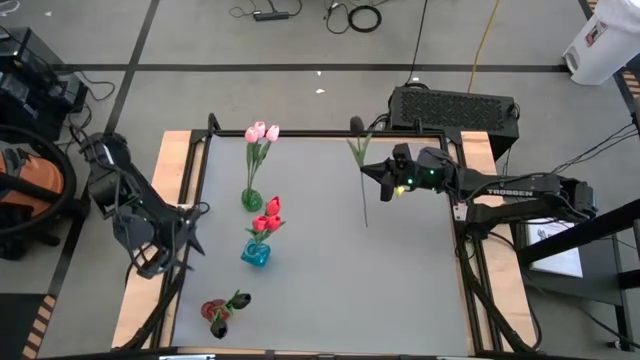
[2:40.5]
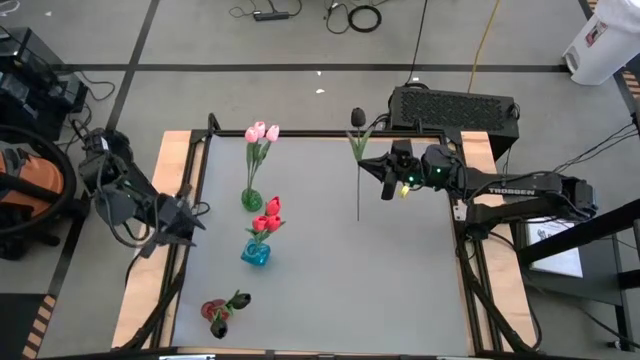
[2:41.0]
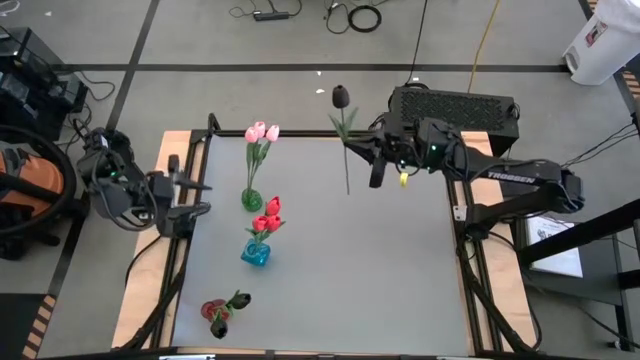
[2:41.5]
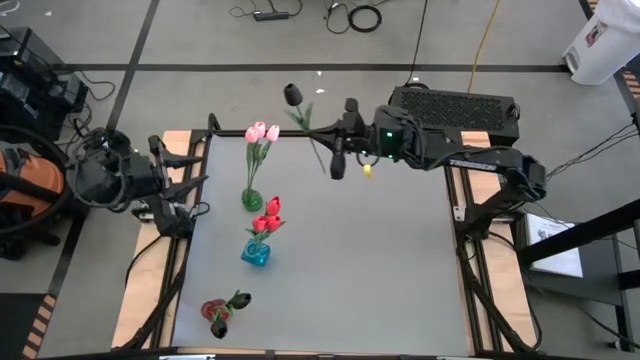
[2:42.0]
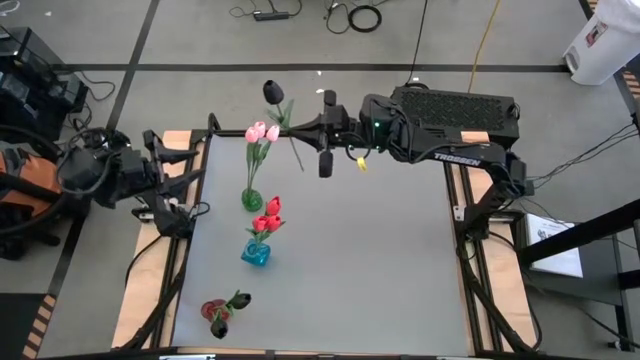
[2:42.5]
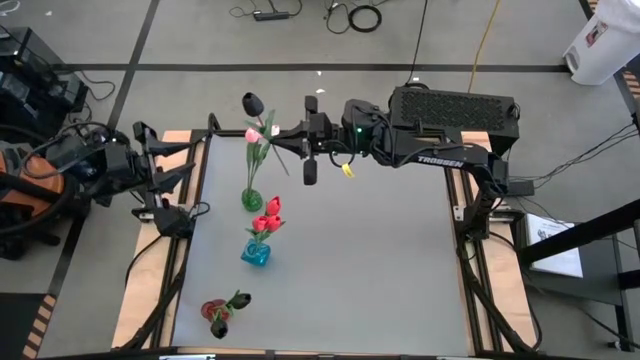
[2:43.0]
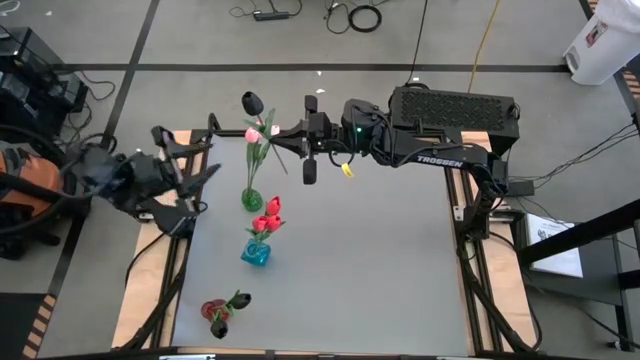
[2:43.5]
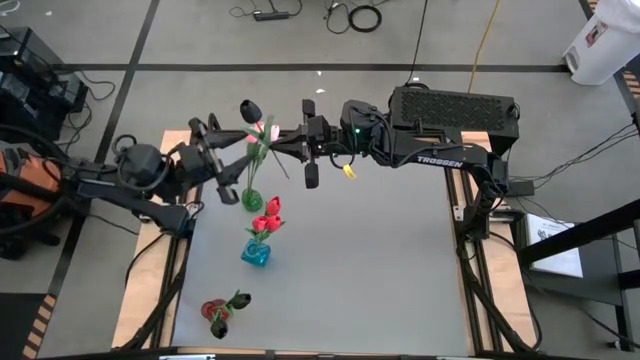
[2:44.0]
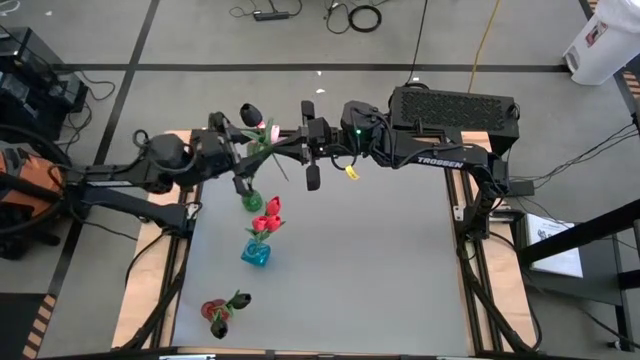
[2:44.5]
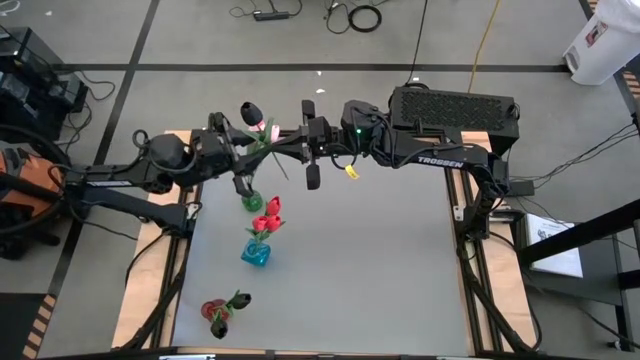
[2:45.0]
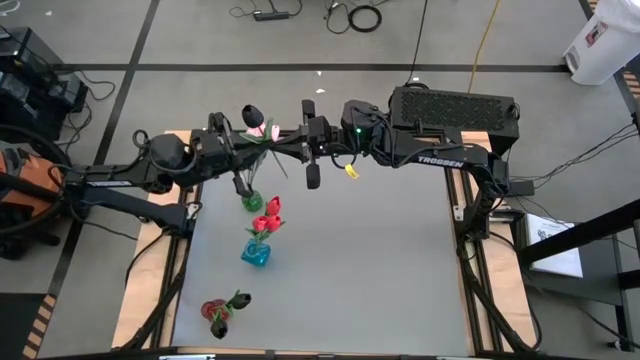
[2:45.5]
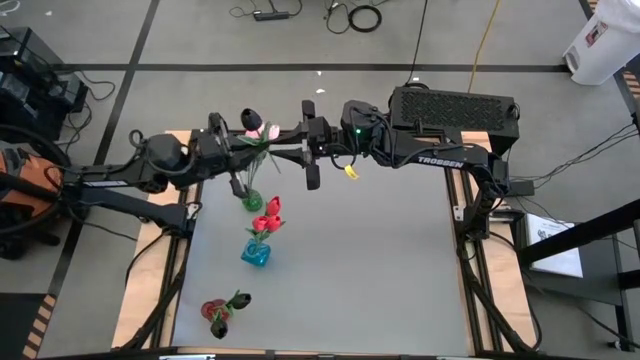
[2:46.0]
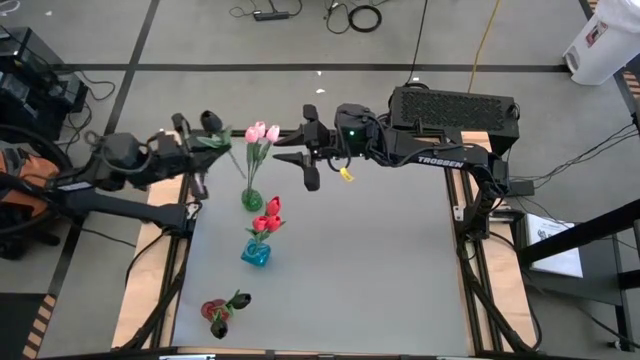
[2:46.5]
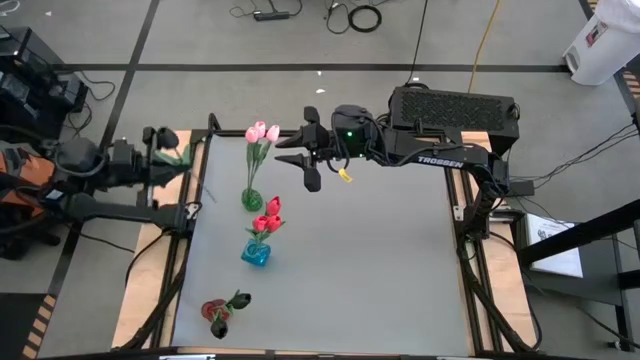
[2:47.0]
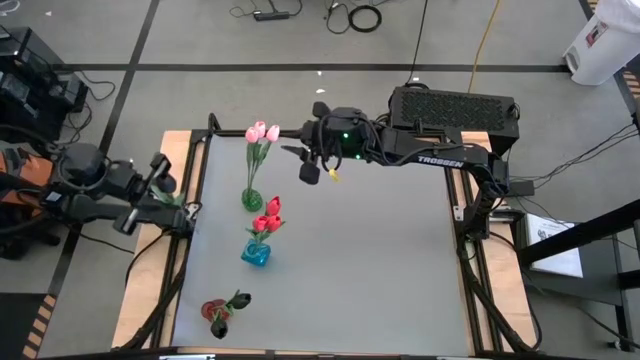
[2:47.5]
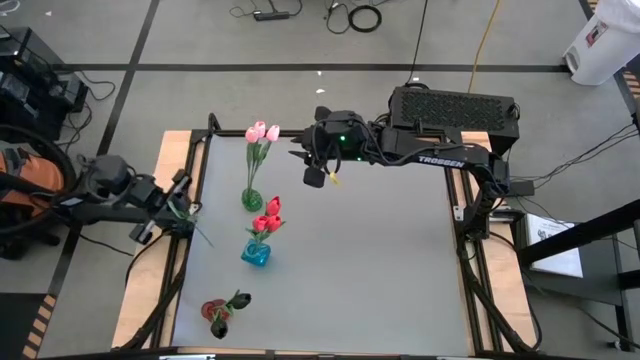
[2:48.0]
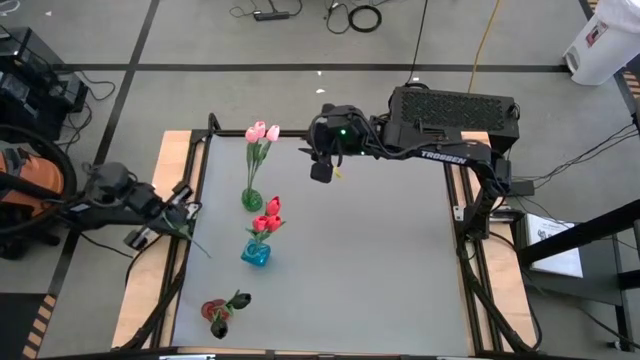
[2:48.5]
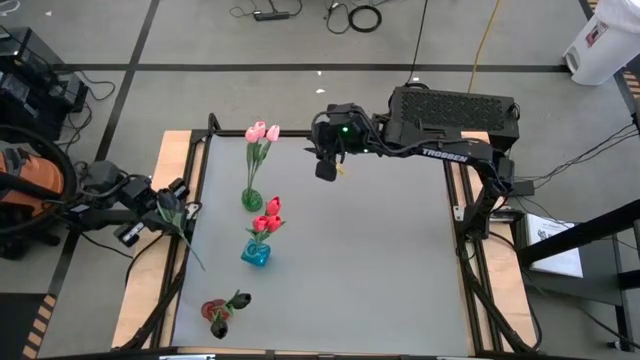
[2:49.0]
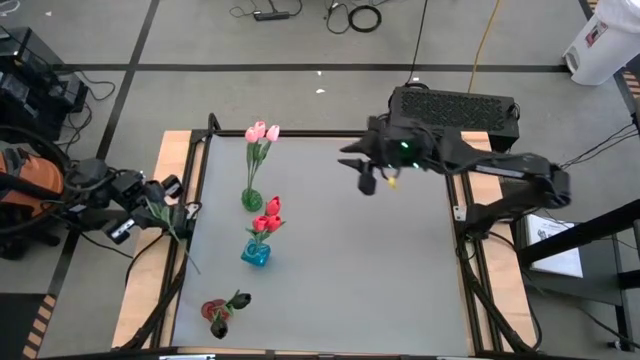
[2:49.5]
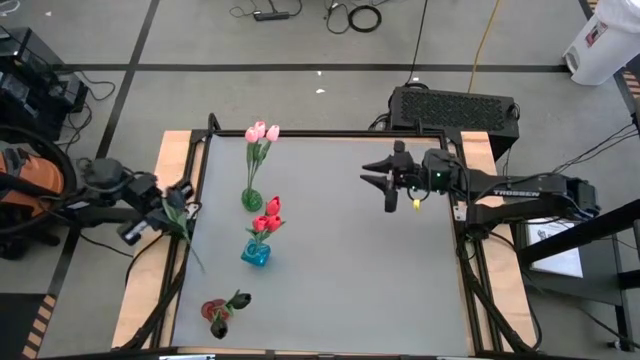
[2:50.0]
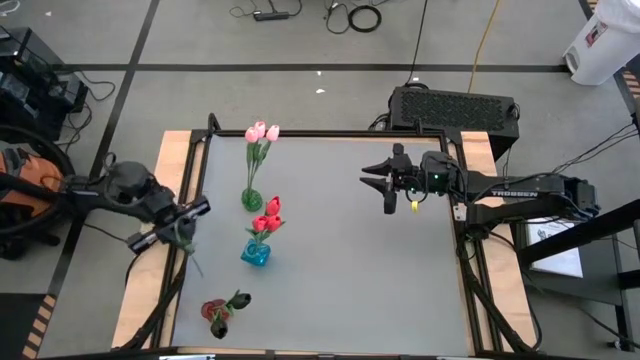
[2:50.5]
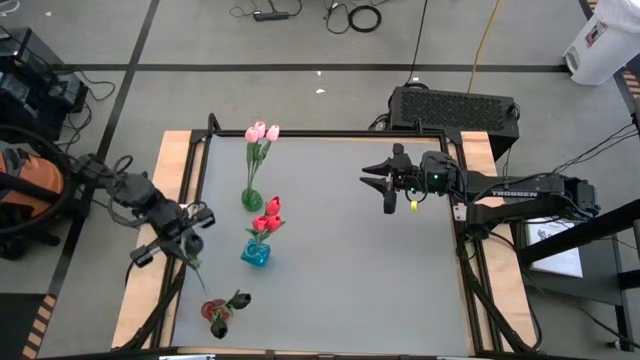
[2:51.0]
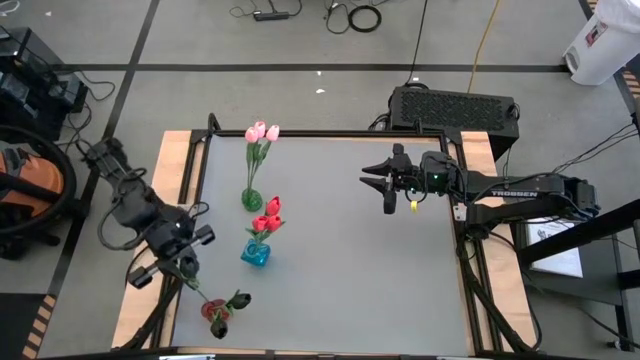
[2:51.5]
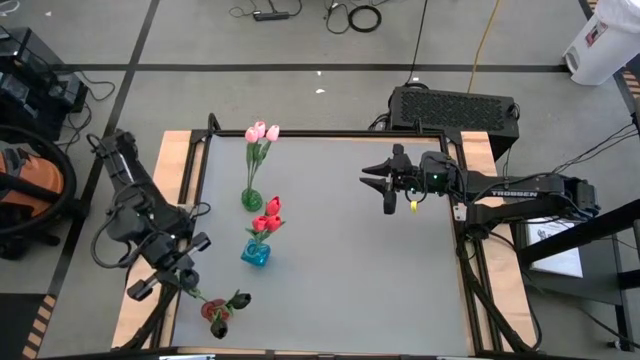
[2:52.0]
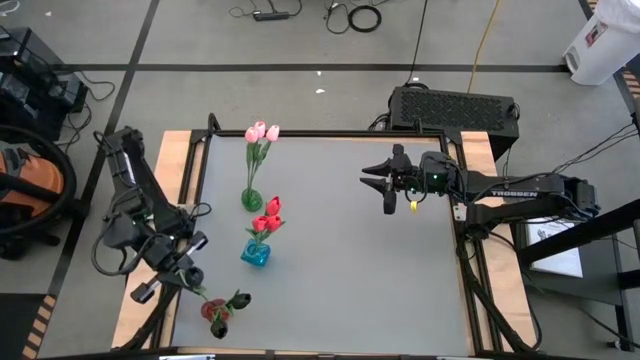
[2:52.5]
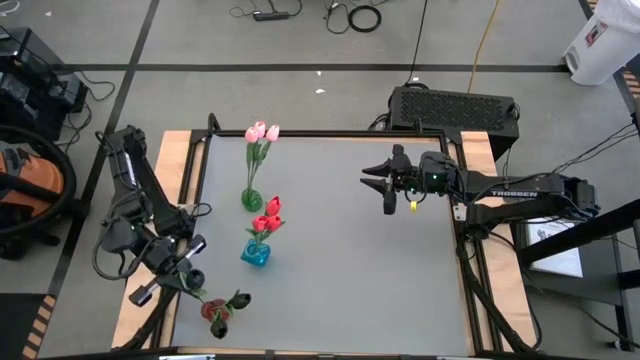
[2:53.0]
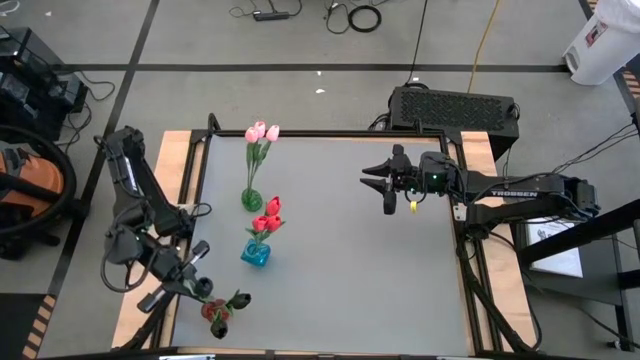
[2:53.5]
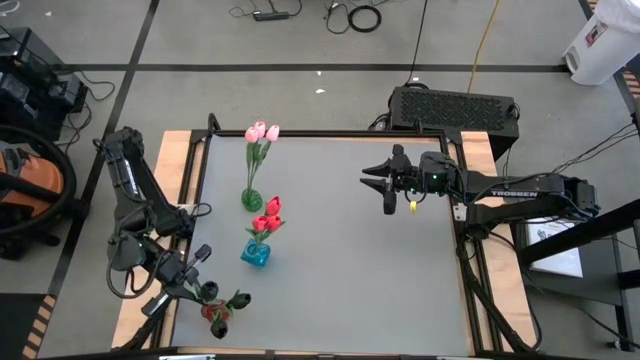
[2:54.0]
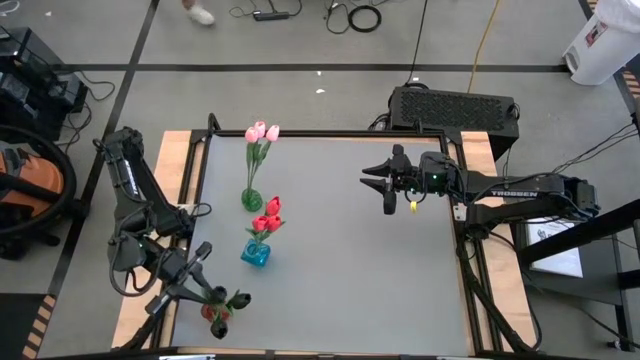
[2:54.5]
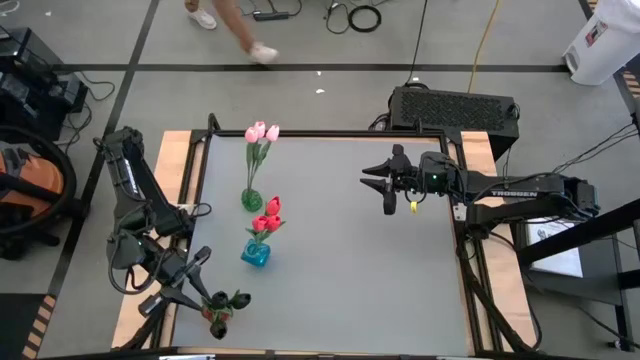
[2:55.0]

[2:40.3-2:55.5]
Task: Sort flowers into vase by color
Put the black flower into the red vase

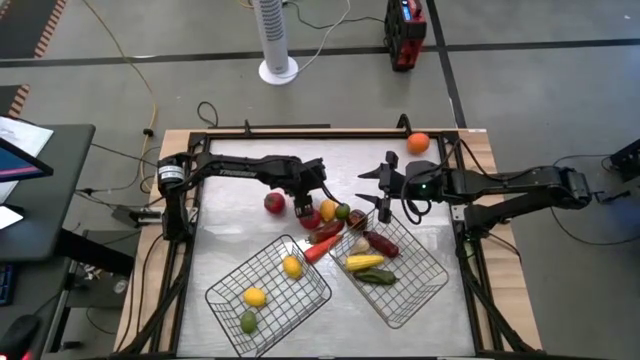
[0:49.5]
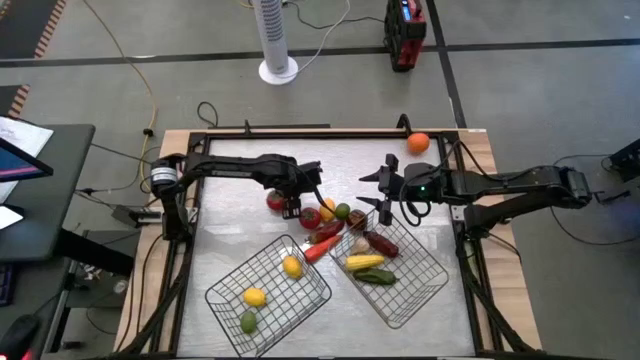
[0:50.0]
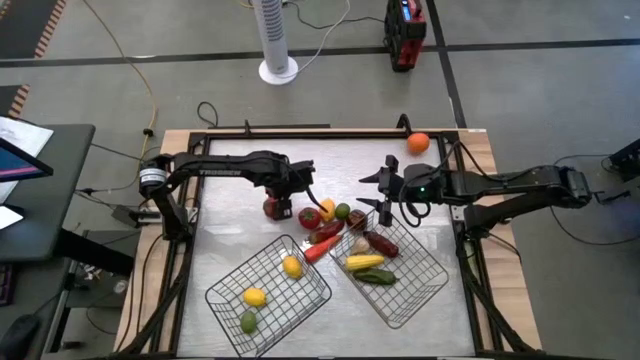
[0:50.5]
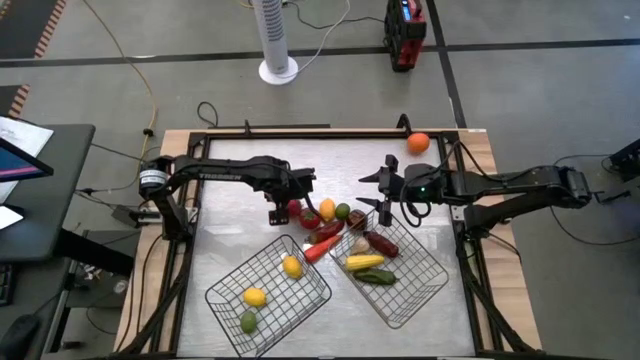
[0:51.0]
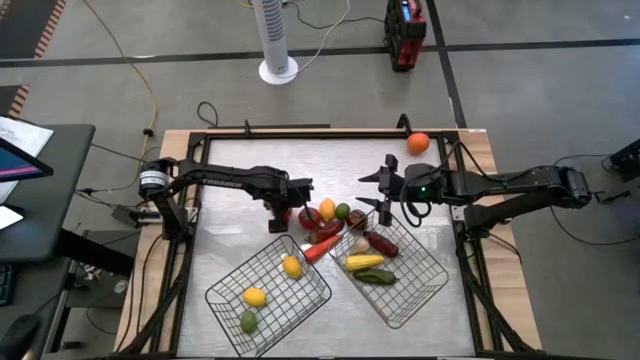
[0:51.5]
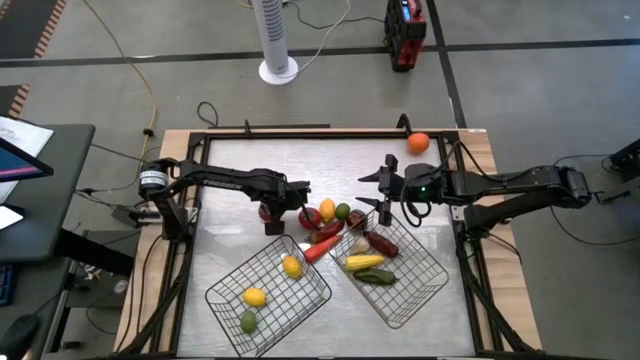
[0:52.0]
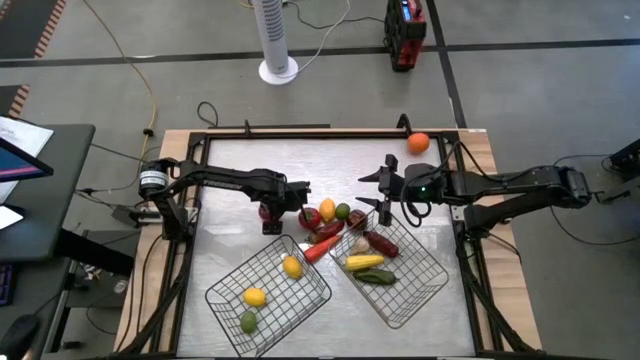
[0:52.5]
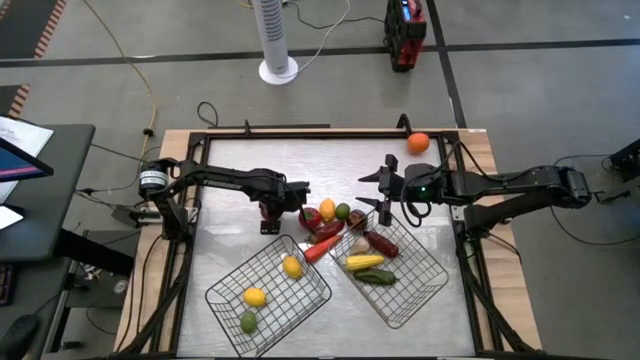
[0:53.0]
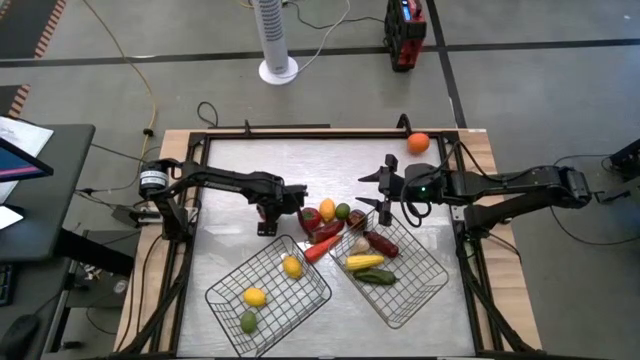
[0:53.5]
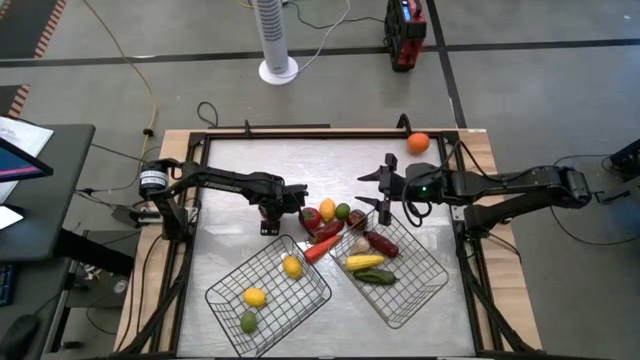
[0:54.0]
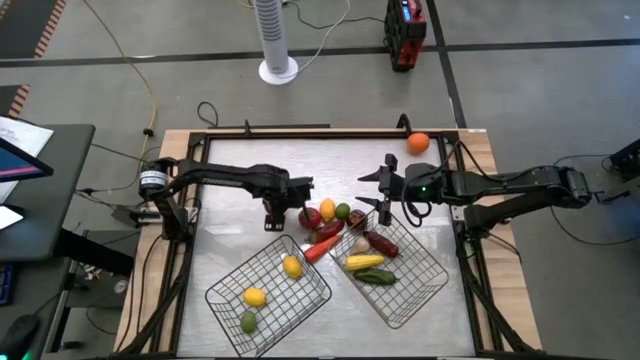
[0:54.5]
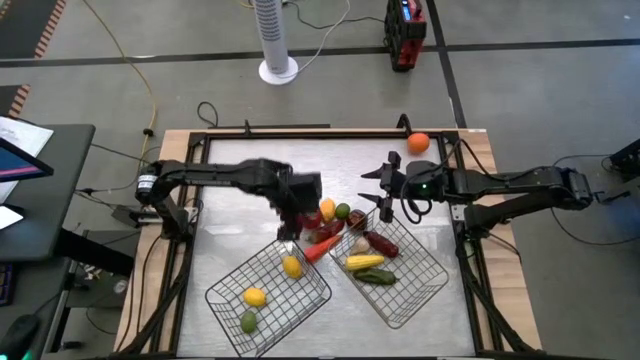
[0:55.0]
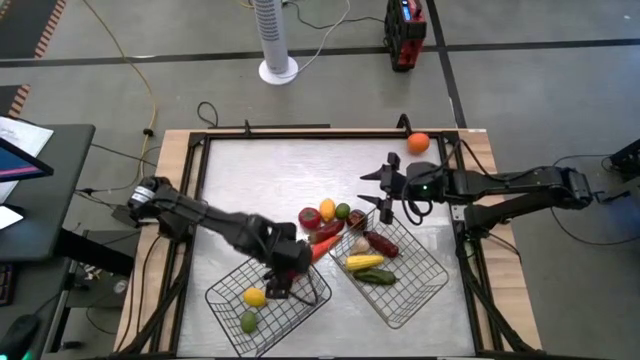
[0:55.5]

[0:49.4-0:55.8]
Task: Sort produce into baskets
Put the top red tomato into the black wire basket

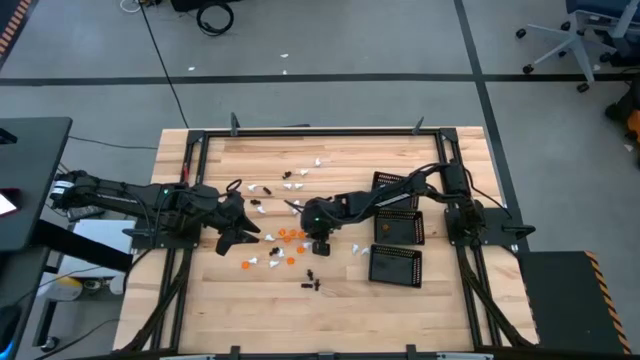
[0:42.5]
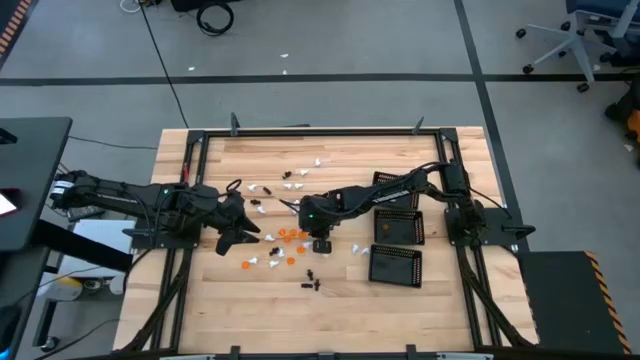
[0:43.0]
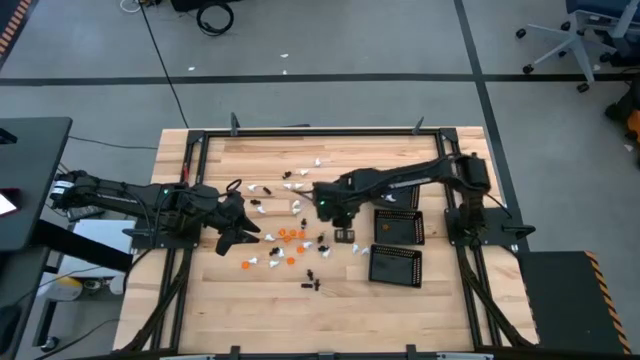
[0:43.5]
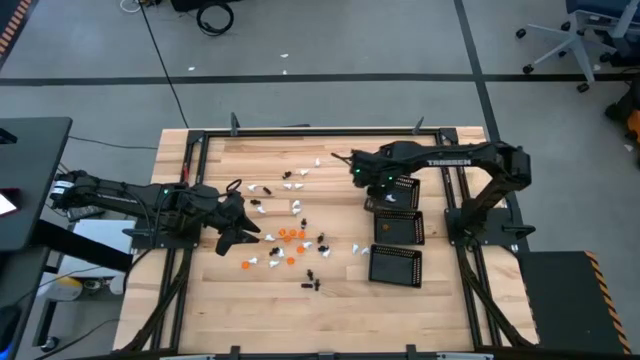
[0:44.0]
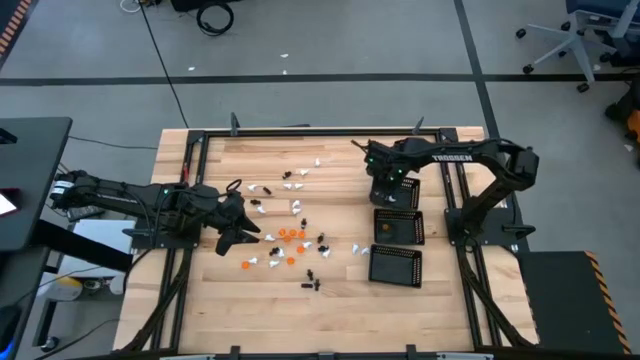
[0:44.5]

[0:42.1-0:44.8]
Task: Sort Halloween decoration
Put the white ghost toy into the top black bin
